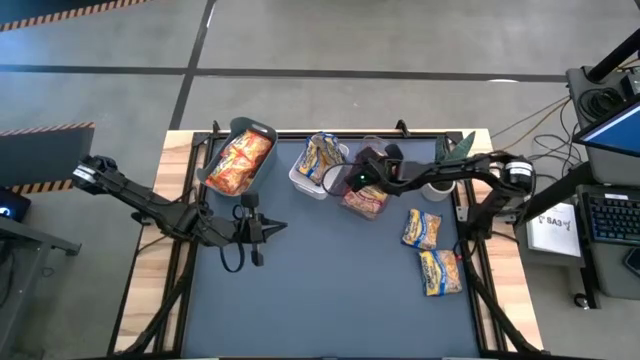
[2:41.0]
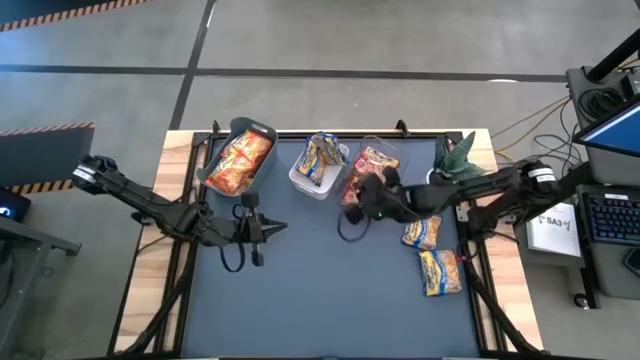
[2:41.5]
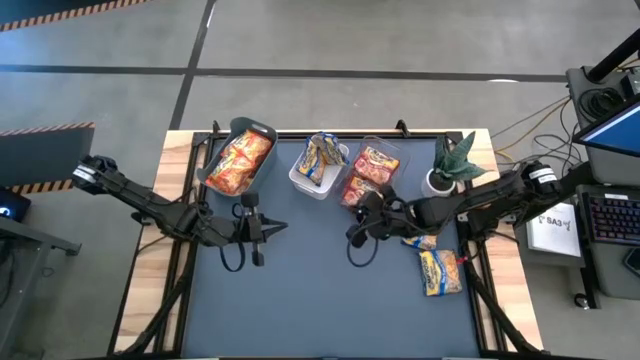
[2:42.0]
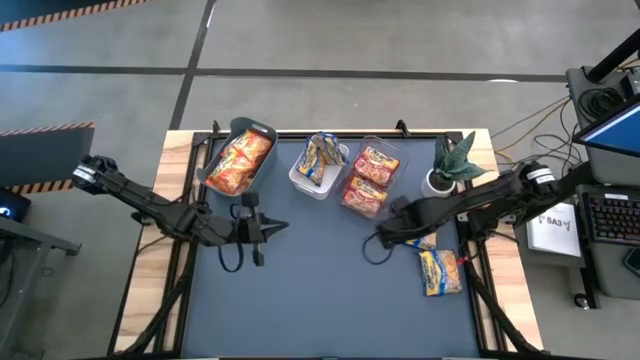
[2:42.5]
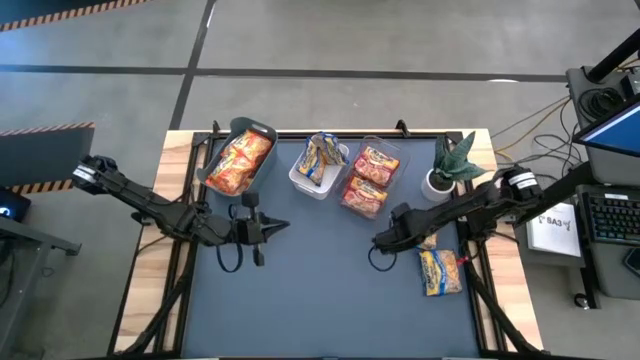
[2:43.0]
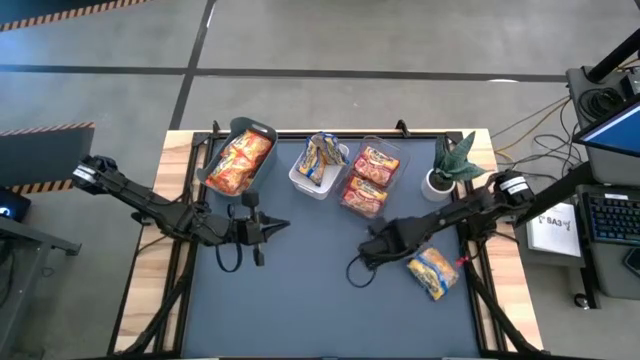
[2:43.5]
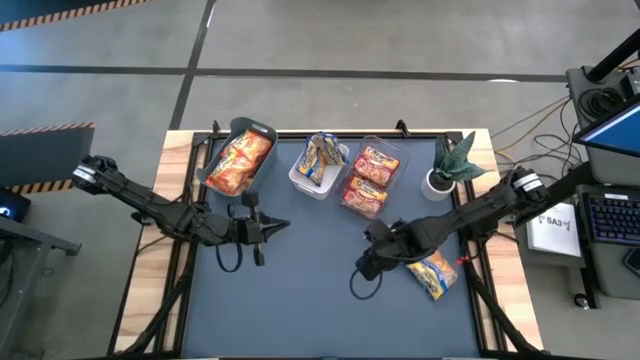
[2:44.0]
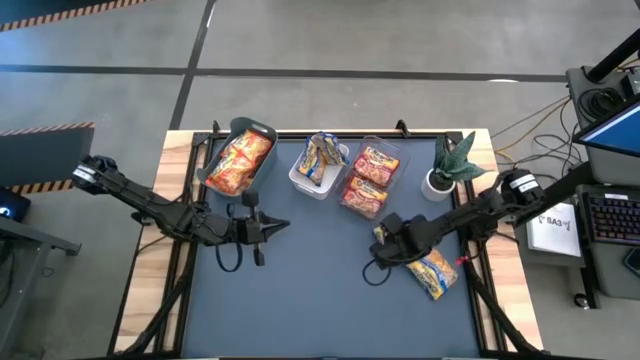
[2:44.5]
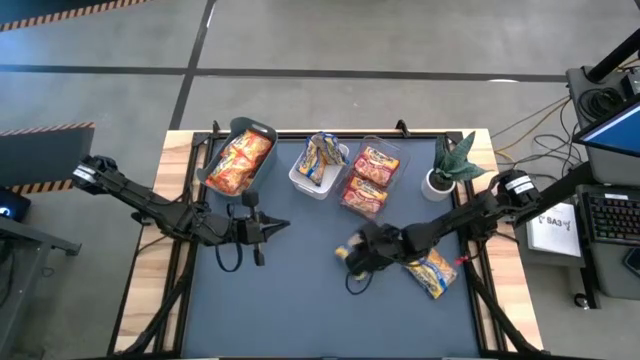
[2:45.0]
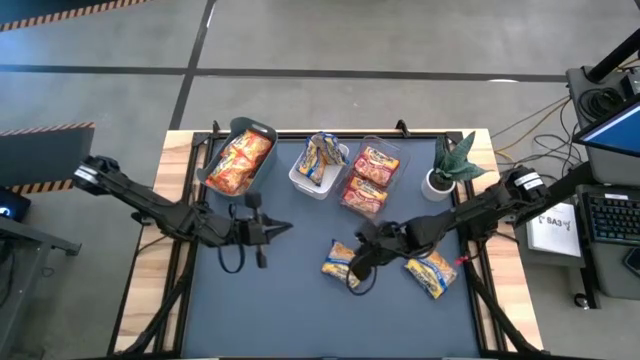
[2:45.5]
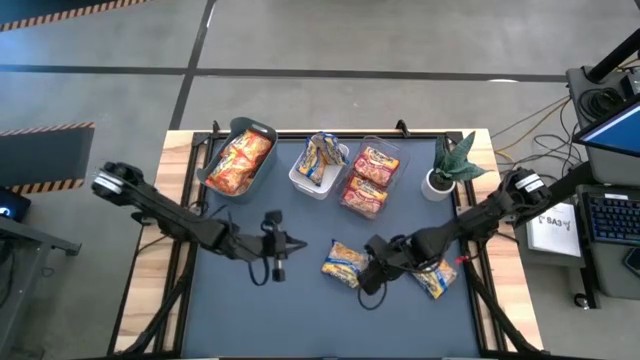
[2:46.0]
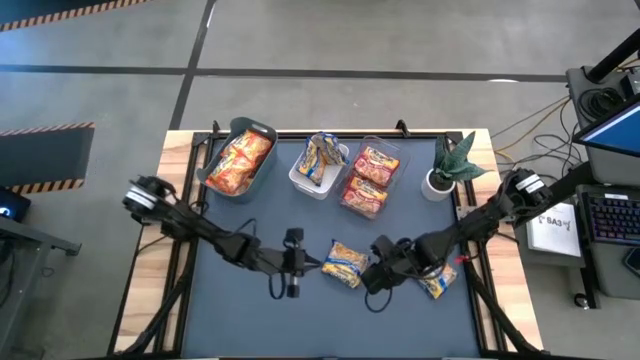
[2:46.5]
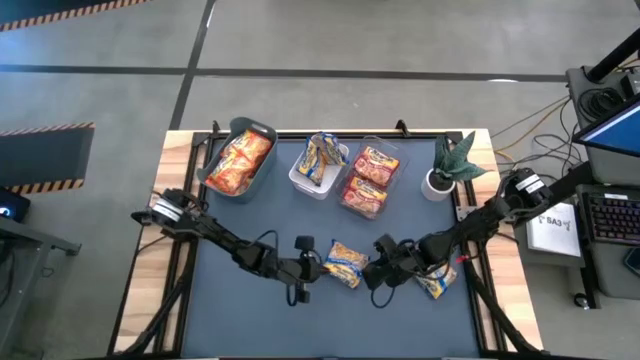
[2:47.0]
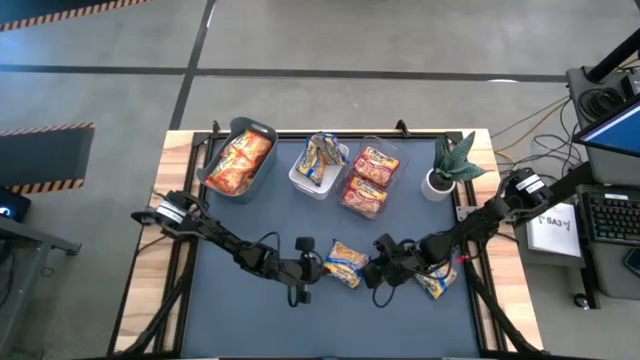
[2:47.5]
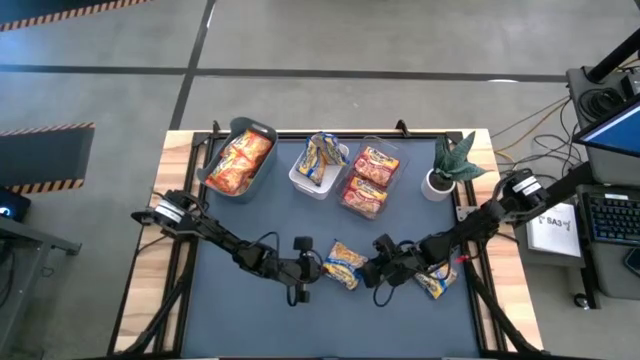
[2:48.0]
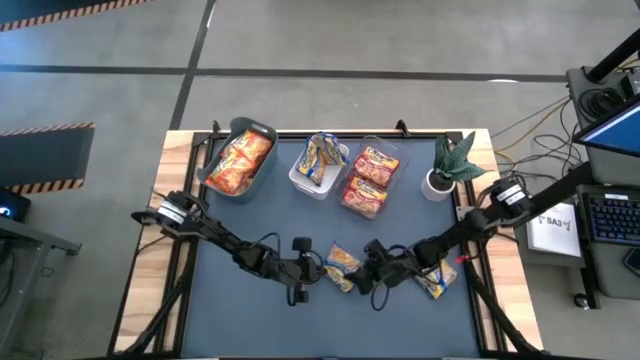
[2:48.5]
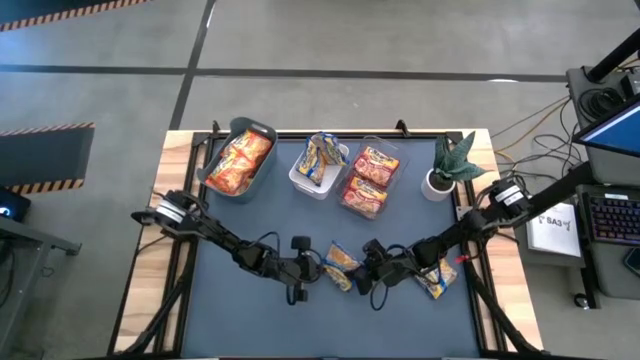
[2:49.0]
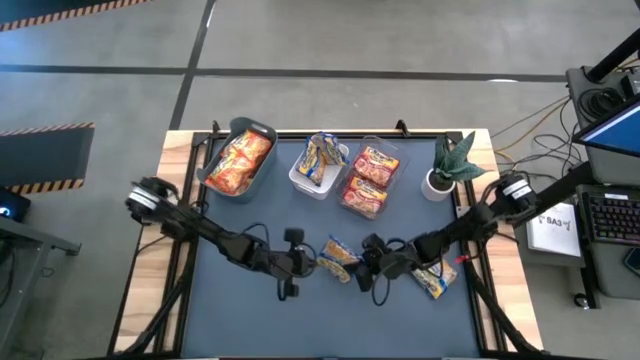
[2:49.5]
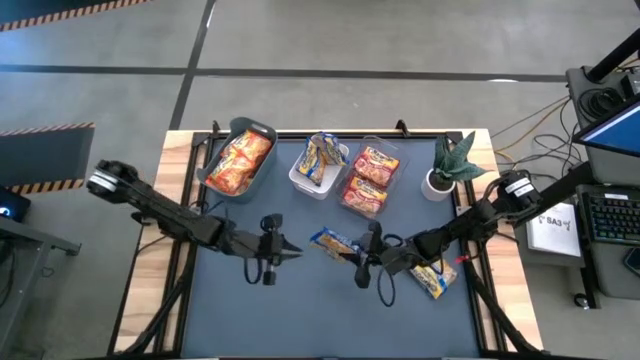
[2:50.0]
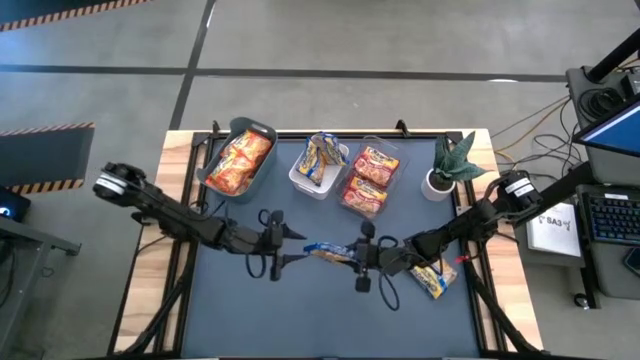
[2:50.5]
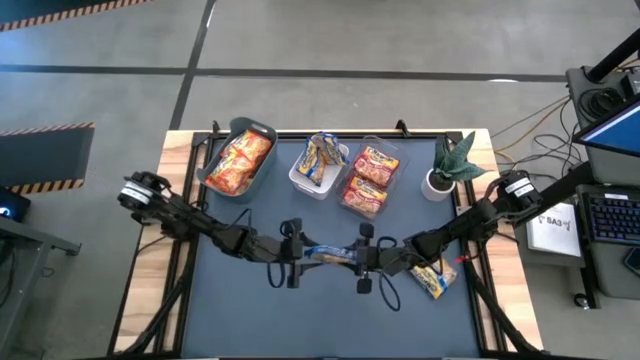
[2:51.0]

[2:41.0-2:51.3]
Task: Sort Maruchan noodles
Put the blue noodle pack into the white bin

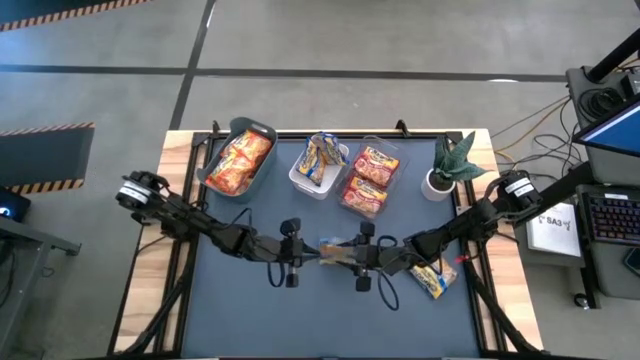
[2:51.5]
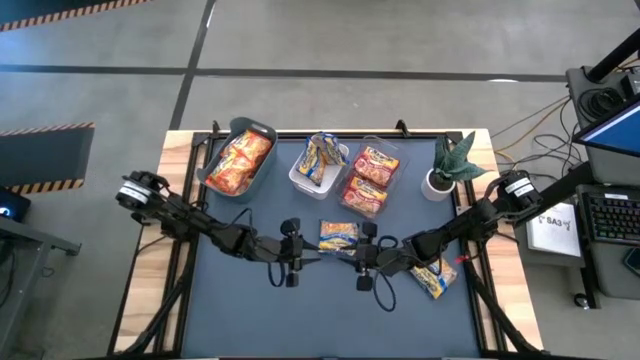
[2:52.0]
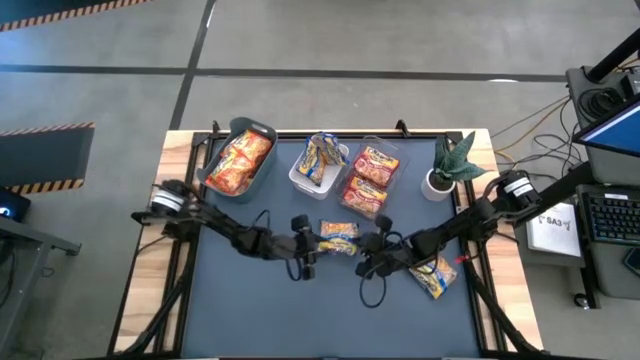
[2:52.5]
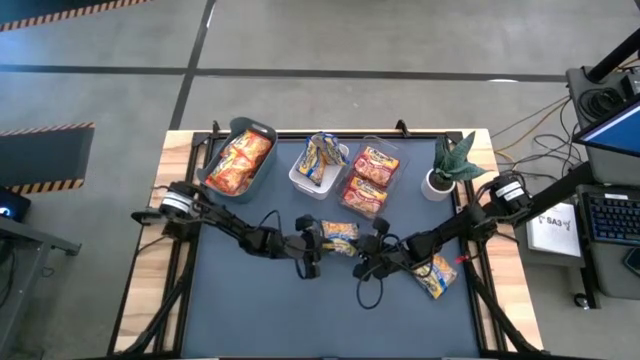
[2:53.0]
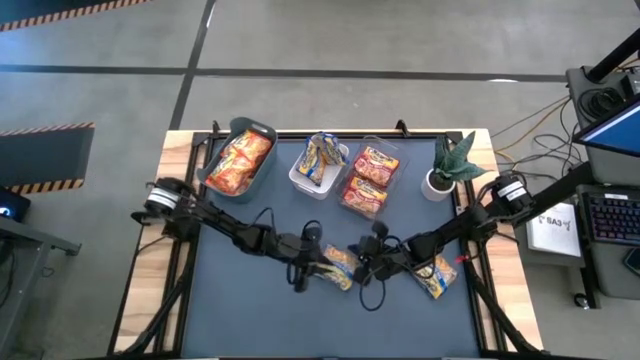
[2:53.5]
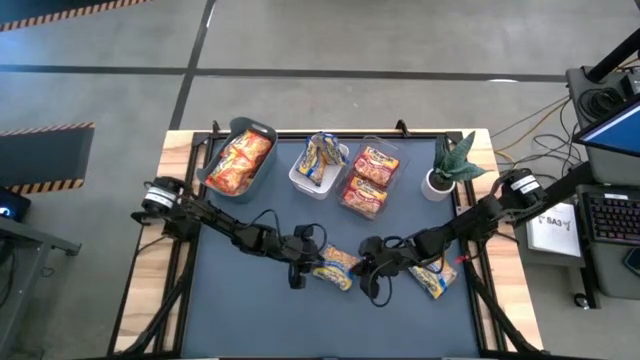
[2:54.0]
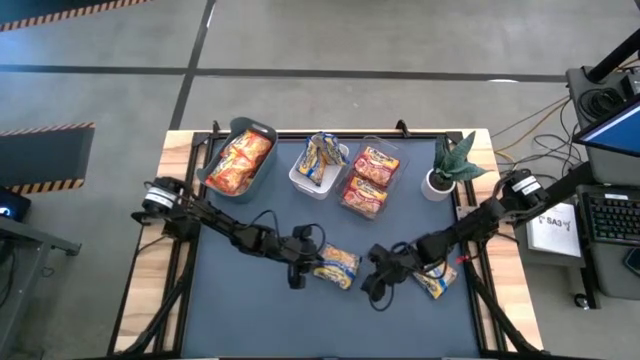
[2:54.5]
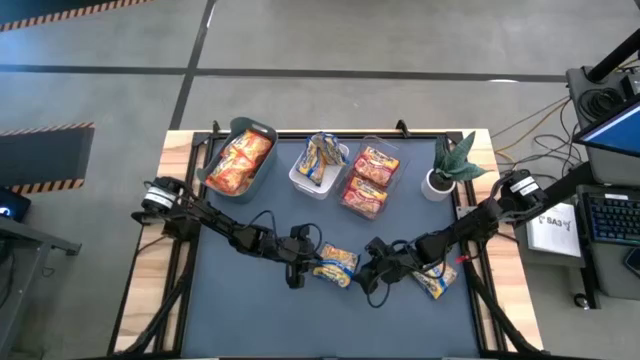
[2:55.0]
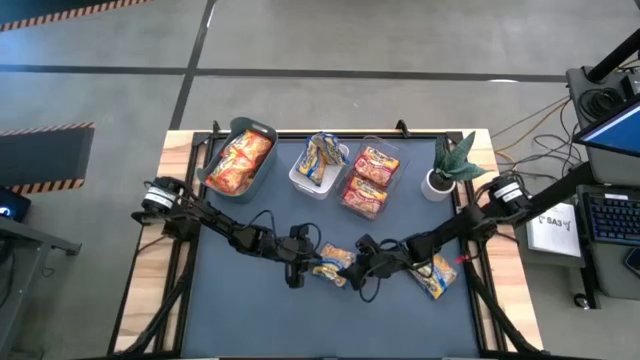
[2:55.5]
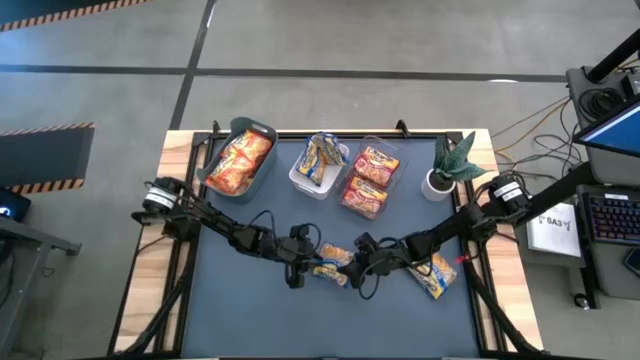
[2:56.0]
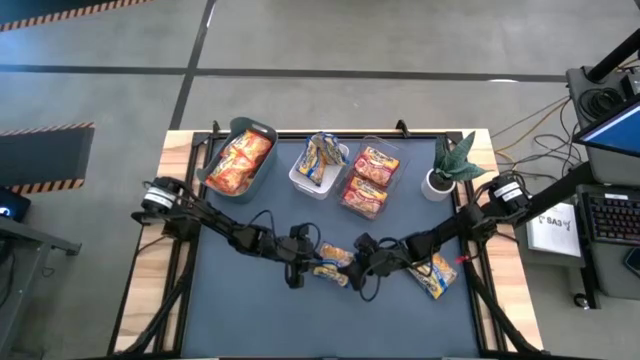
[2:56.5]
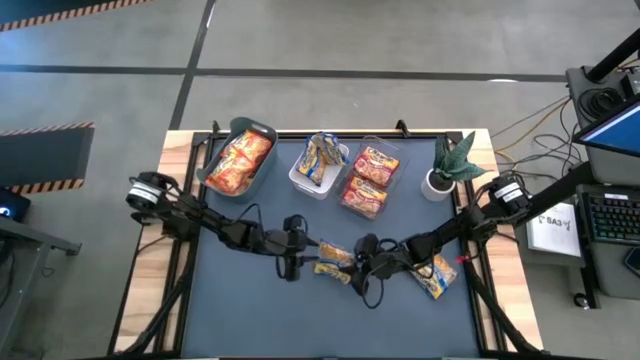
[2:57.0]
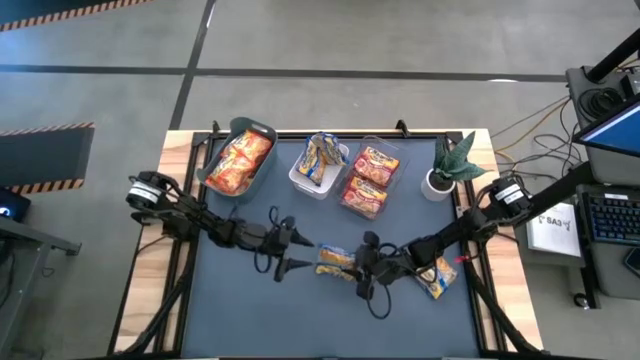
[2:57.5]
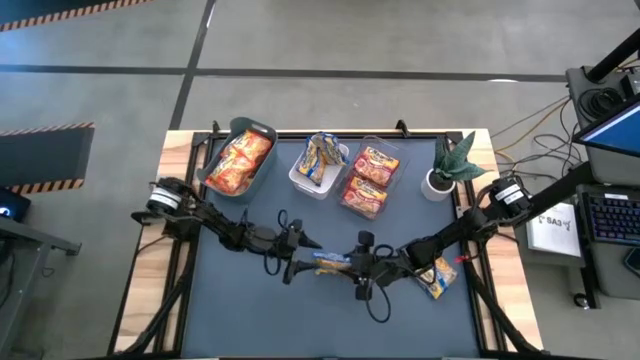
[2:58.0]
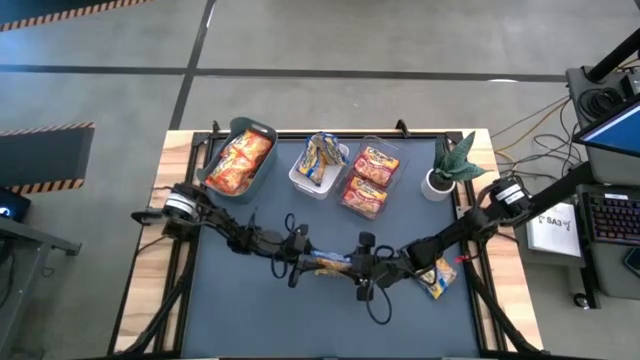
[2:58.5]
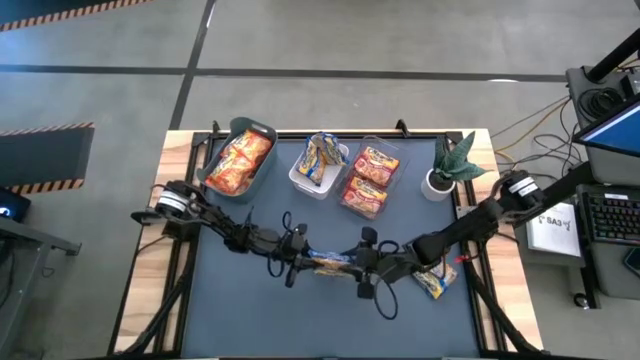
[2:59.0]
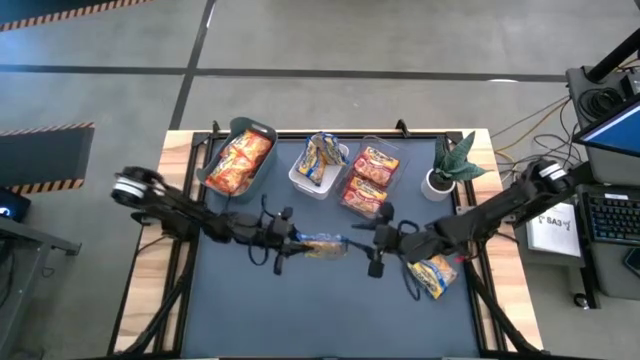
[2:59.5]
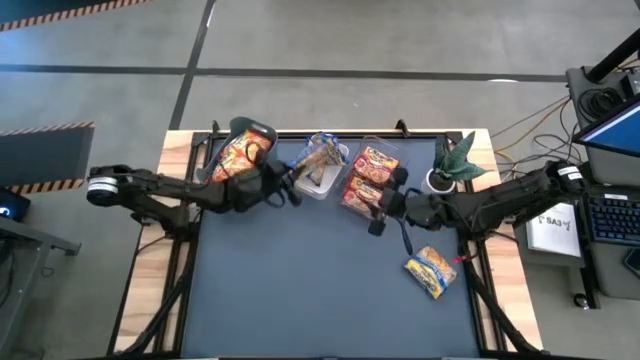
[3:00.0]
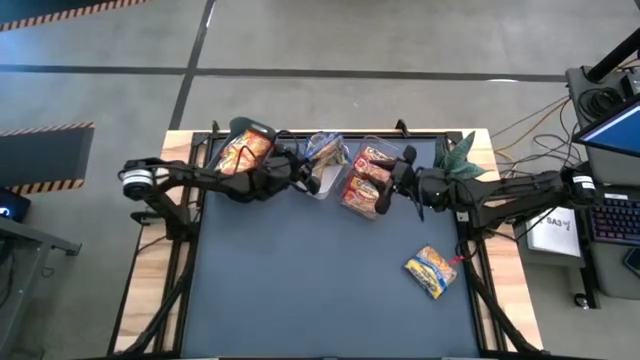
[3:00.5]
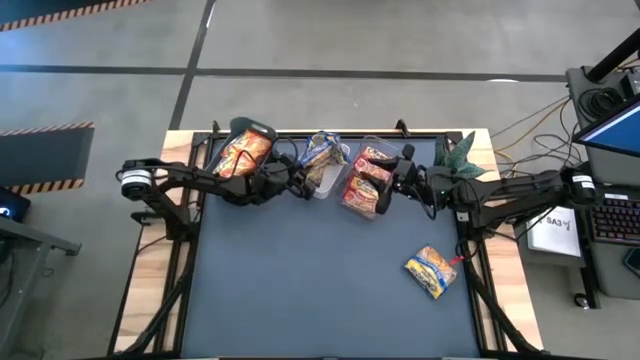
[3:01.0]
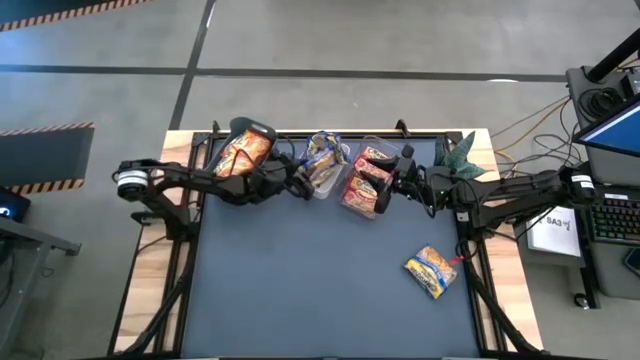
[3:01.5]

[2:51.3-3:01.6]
Put the blue noodle pack into the white bin
